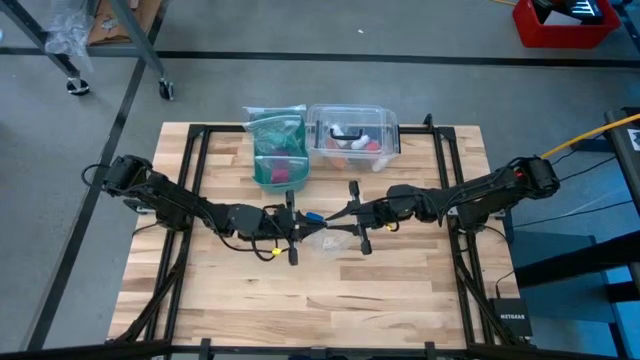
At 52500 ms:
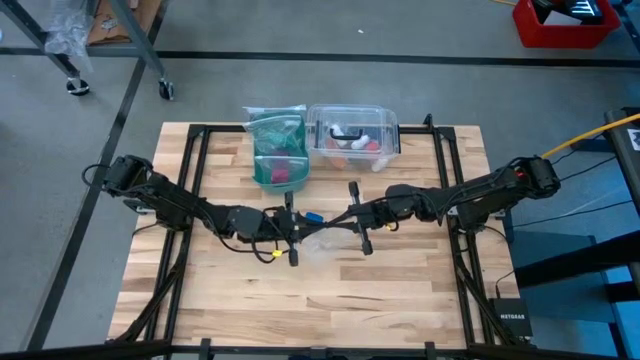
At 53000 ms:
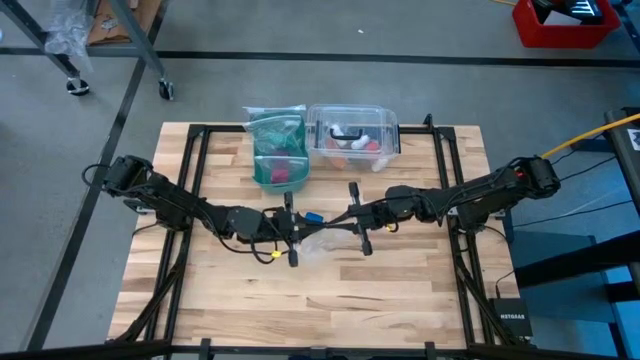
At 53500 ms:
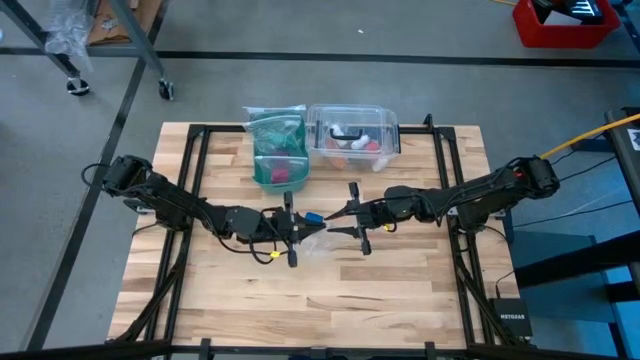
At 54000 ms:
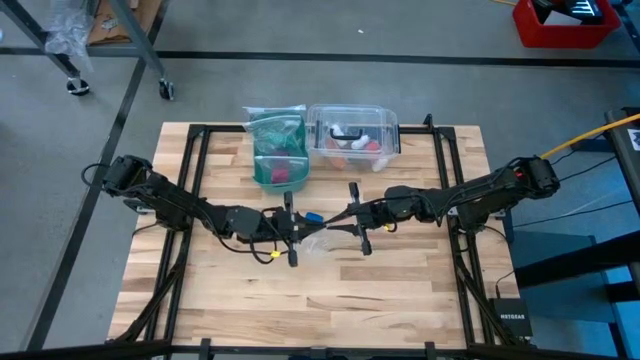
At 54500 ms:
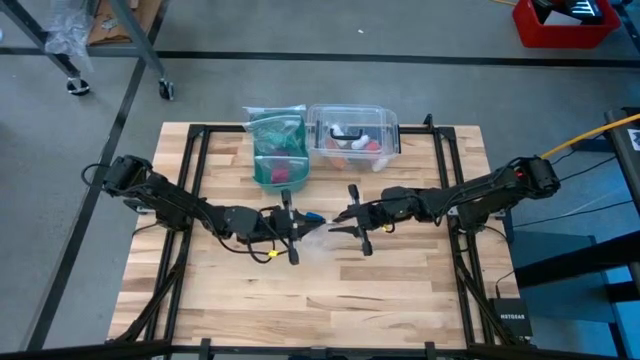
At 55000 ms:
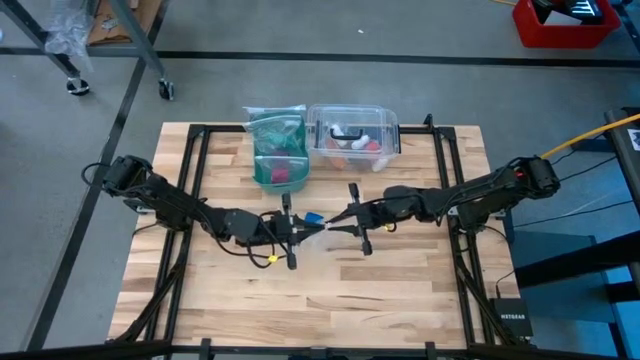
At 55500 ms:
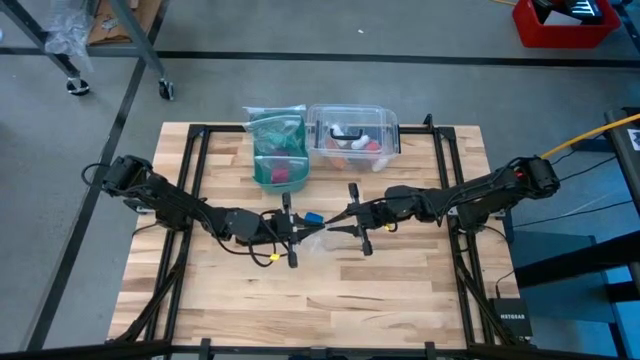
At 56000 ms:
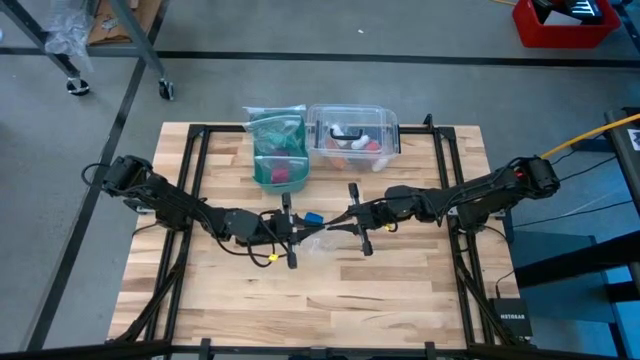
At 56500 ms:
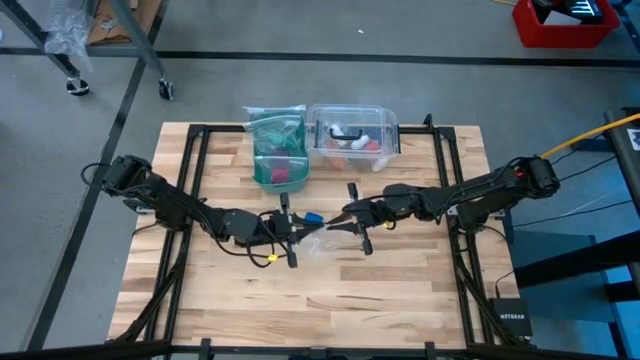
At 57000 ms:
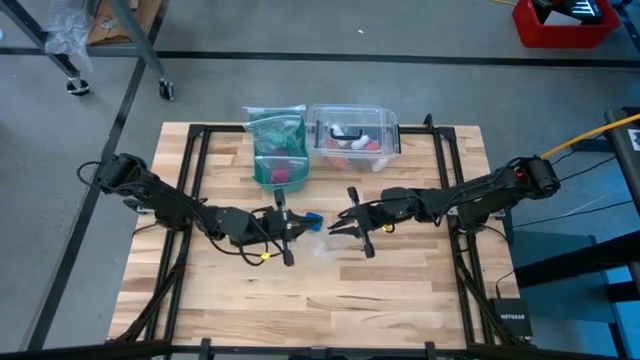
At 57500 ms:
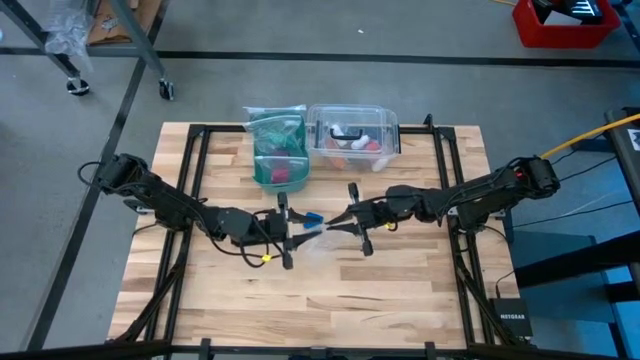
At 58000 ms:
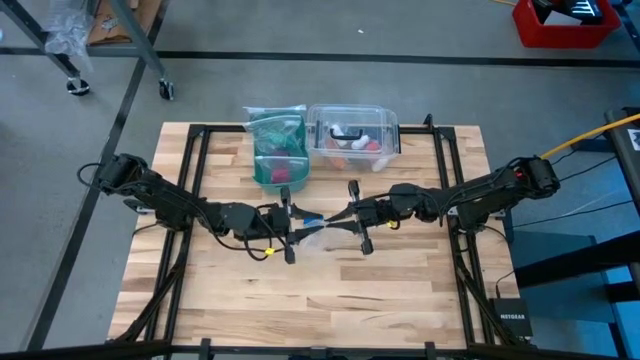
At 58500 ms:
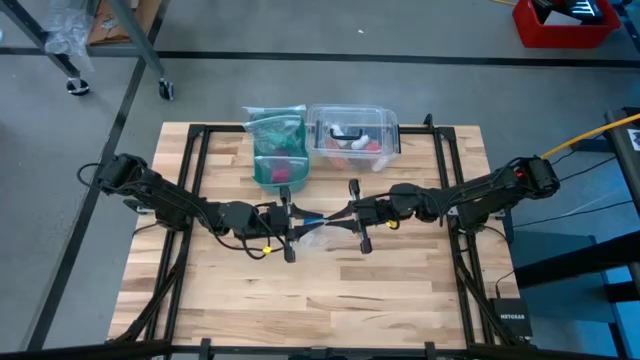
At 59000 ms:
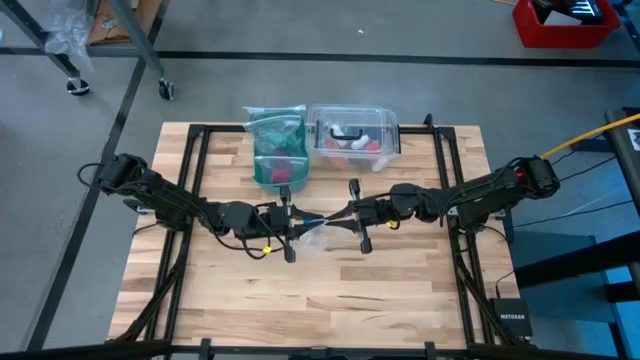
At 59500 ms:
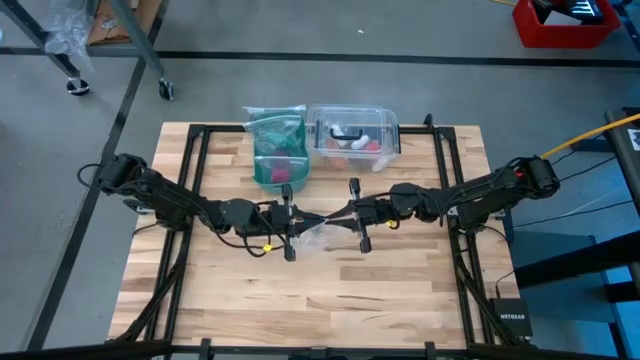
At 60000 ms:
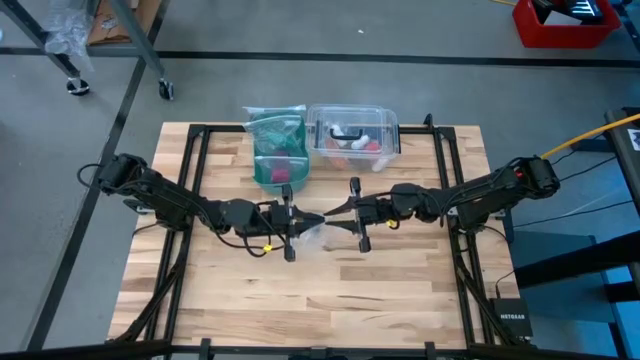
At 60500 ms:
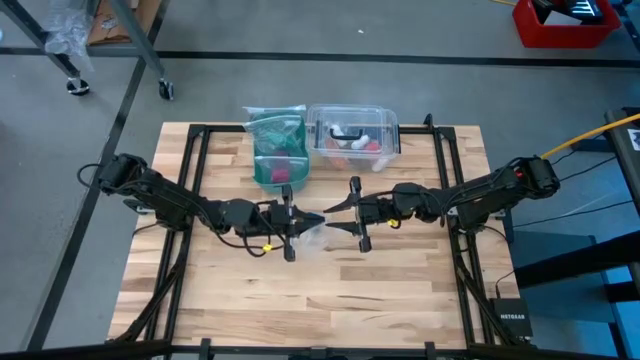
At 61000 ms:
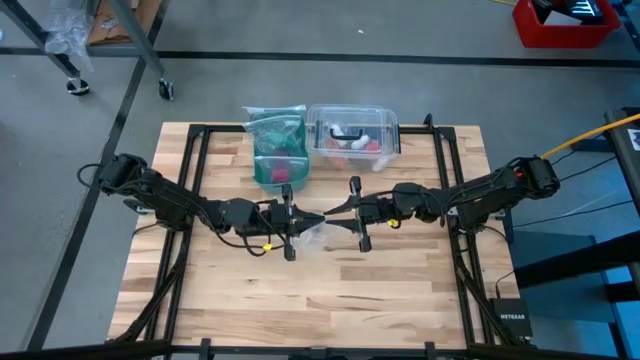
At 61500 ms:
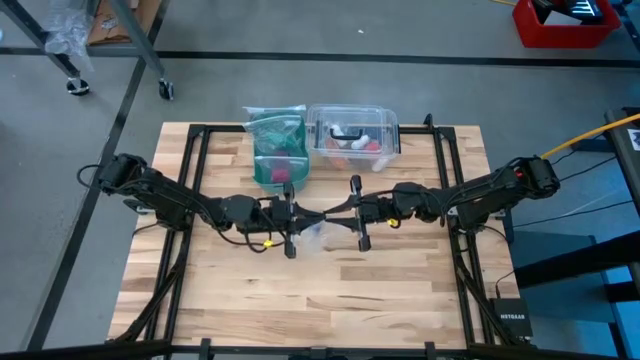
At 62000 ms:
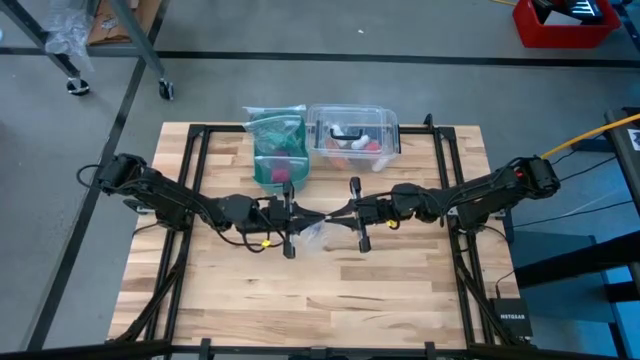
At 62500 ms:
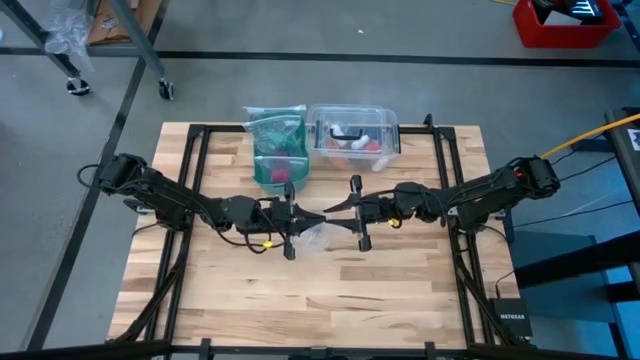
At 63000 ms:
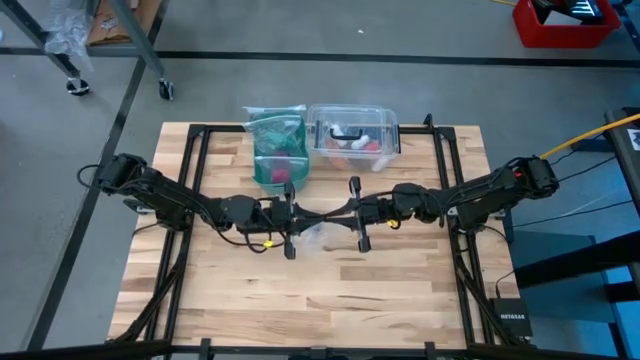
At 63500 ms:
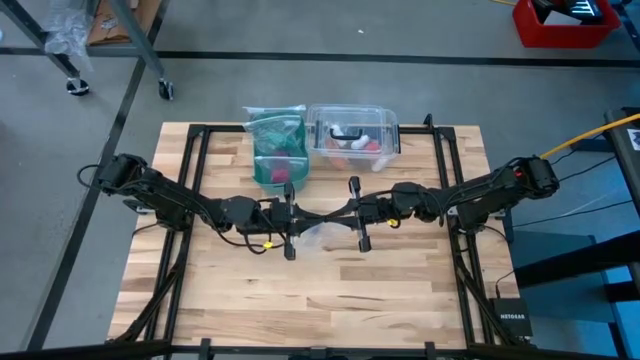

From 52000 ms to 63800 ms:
Task: Roll bandage
Open the transparent zip bag

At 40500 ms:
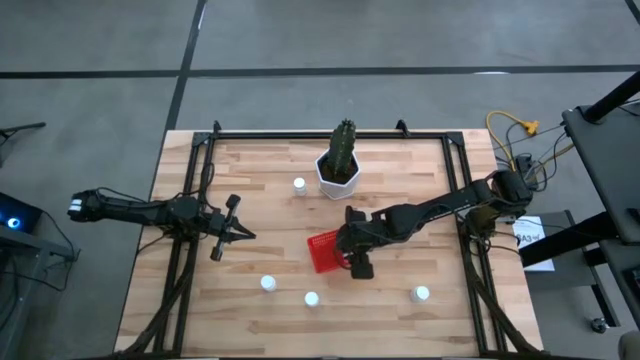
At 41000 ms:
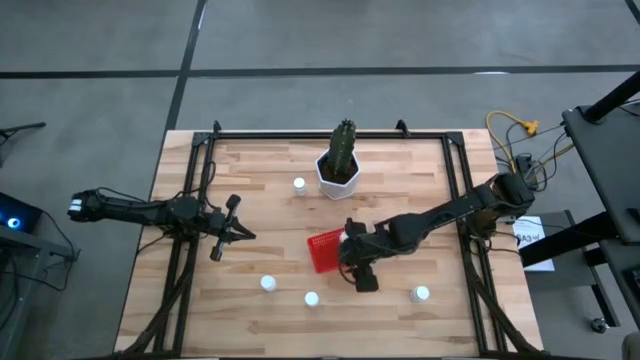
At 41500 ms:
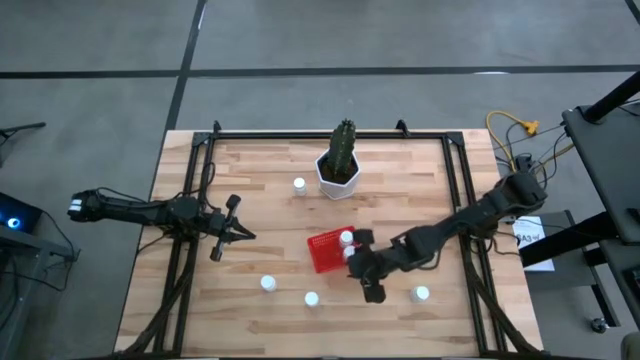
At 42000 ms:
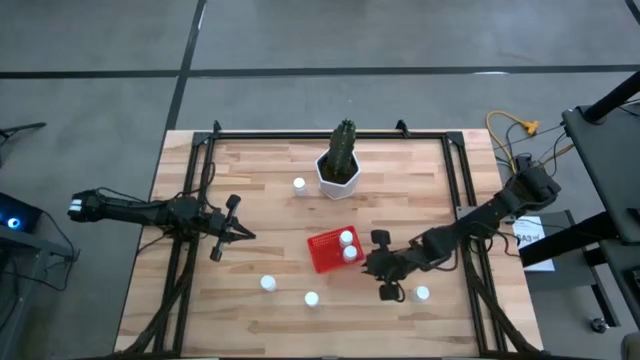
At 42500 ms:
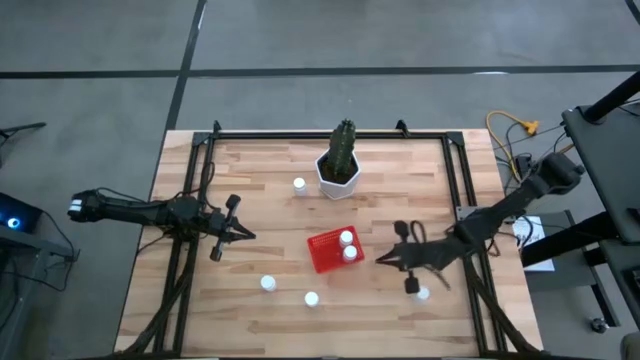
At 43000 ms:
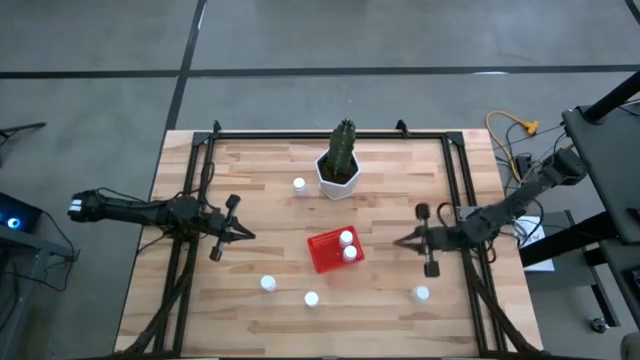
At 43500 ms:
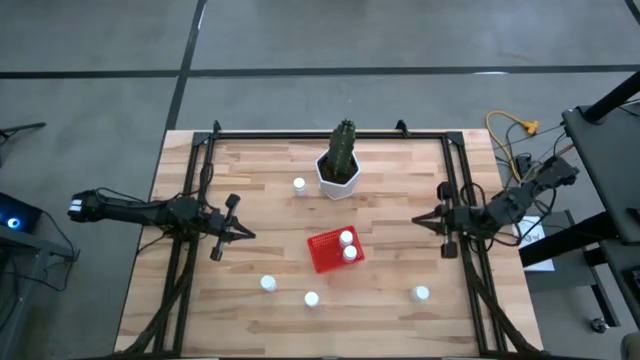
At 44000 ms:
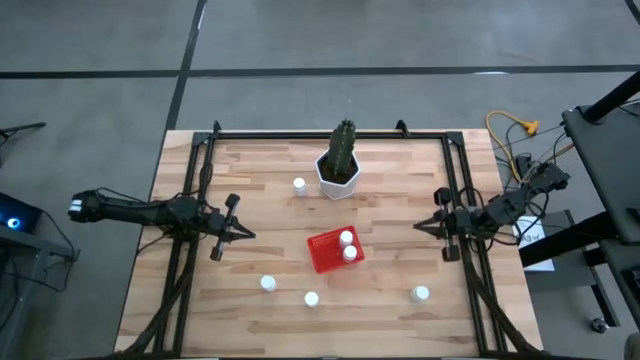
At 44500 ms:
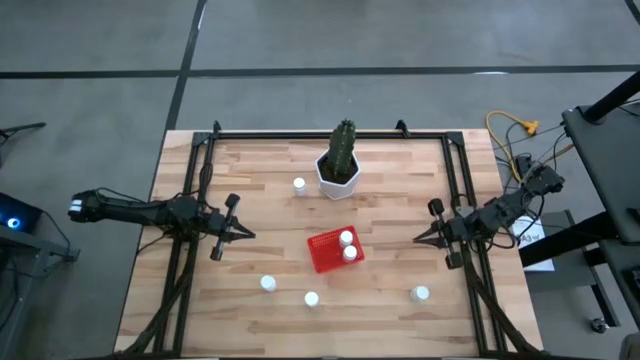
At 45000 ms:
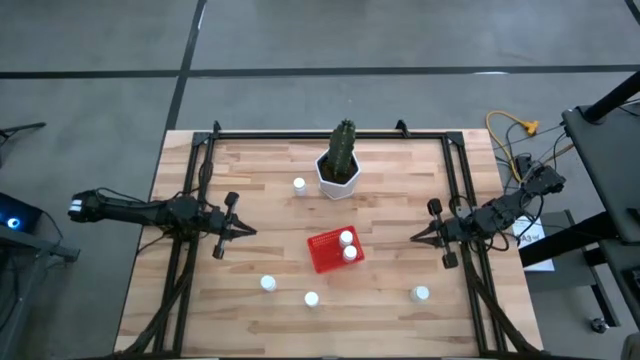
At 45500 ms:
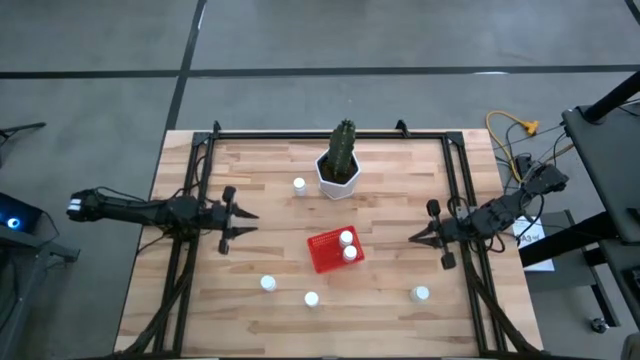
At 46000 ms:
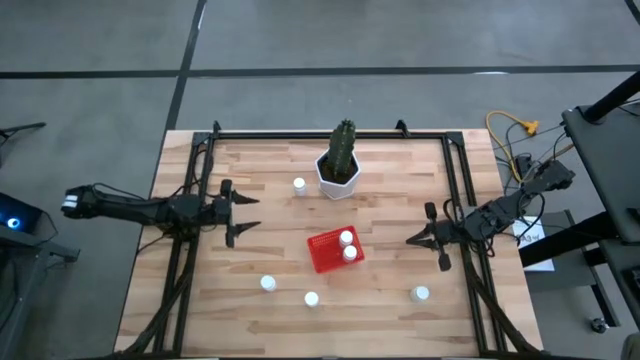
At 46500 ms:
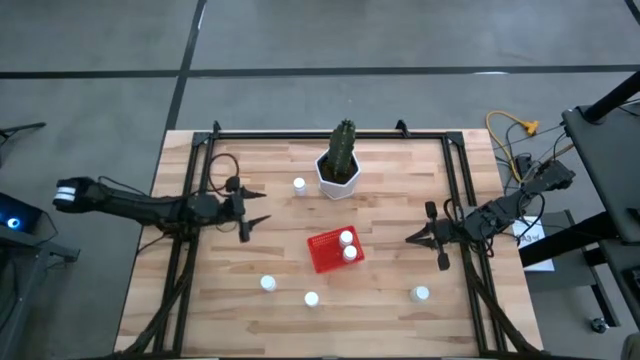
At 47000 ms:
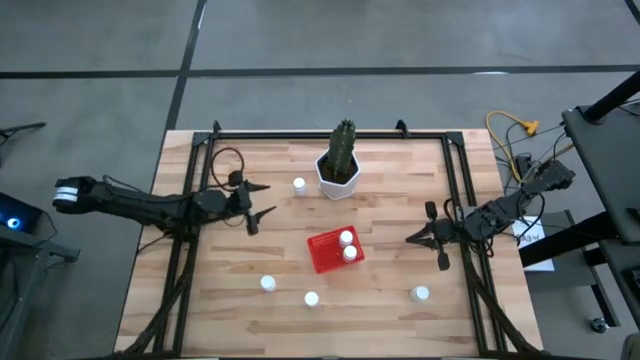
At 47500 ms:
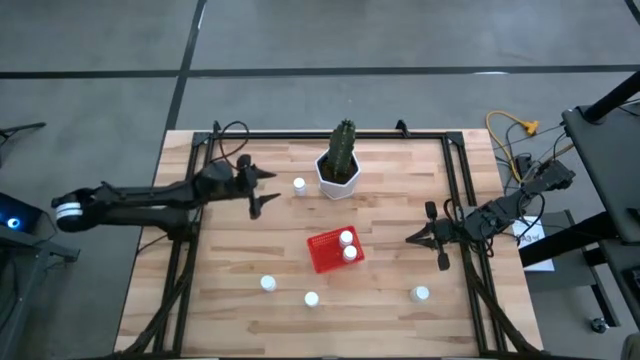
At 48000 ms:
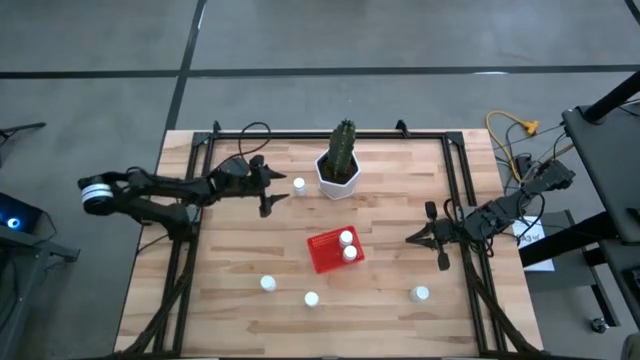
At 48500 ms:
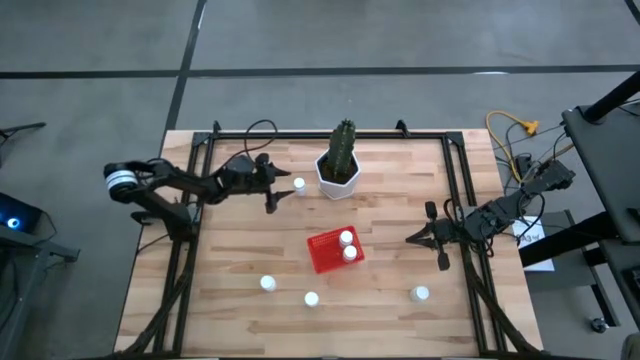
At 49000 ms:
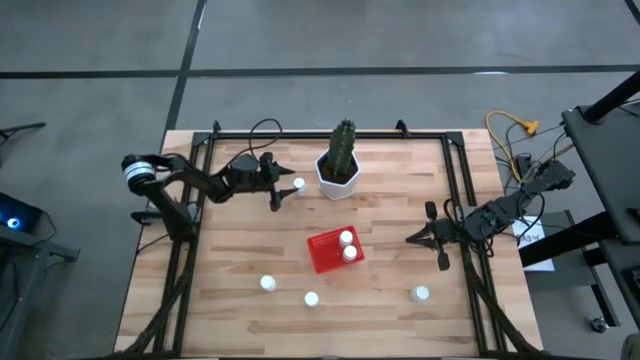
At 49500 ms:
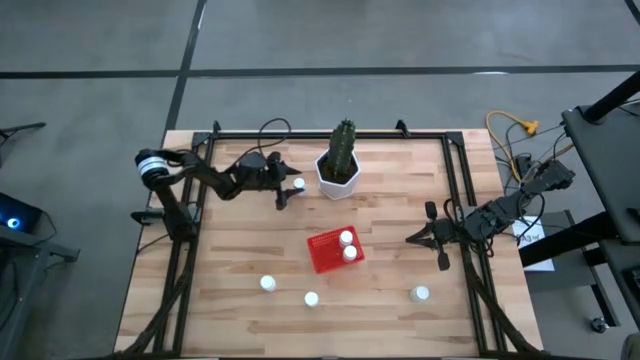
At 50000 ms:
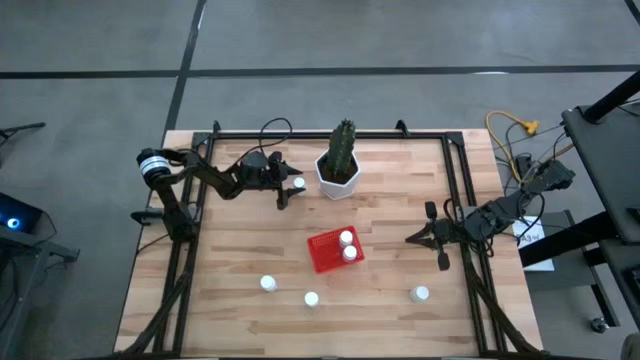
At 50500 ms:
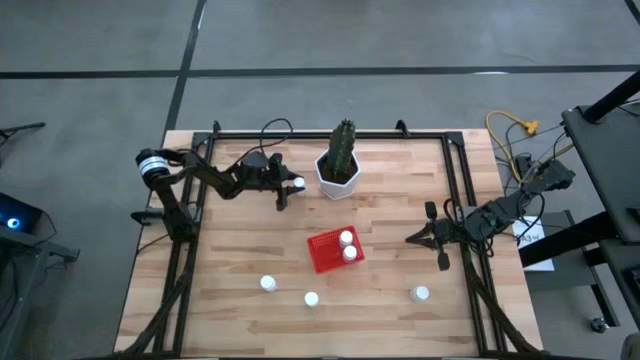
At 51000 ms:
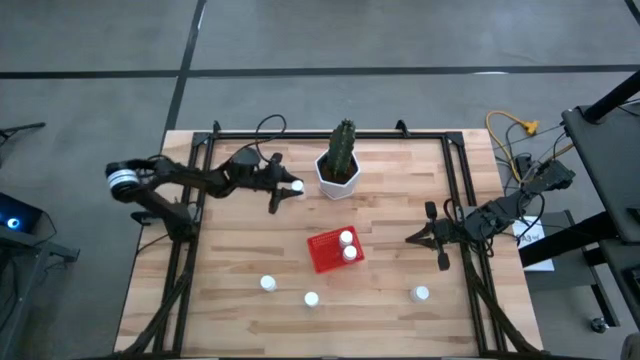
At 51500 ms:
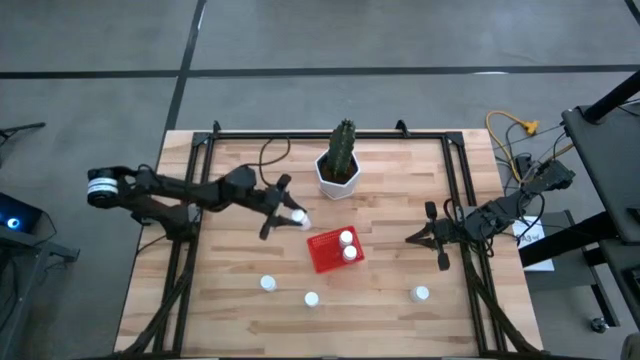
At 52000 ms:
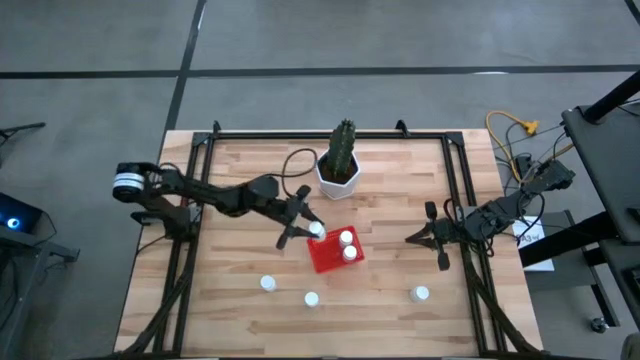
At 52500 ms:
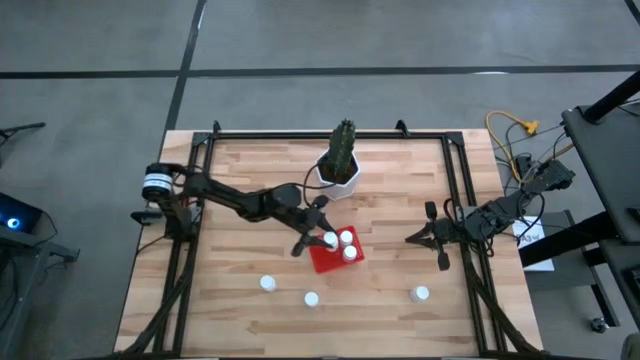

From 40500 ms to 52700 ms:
Task: Pick and place pill bottles into a basket
Put the white pill bottle into the red bin
